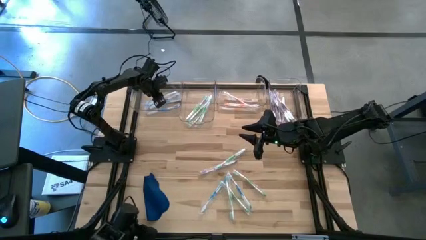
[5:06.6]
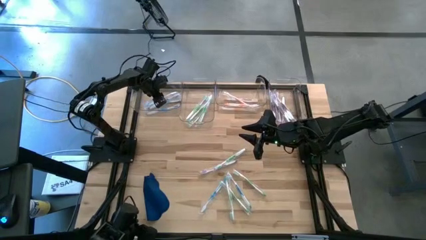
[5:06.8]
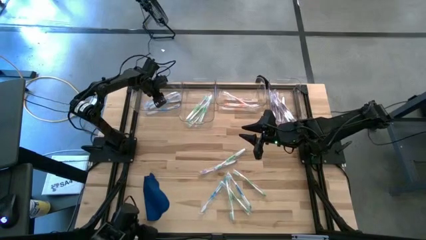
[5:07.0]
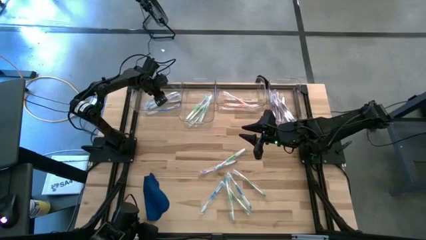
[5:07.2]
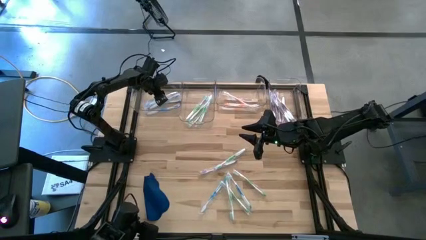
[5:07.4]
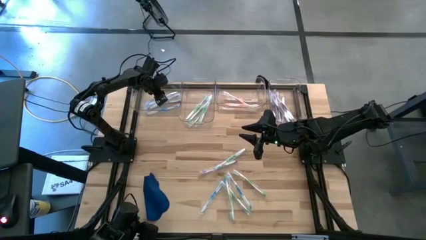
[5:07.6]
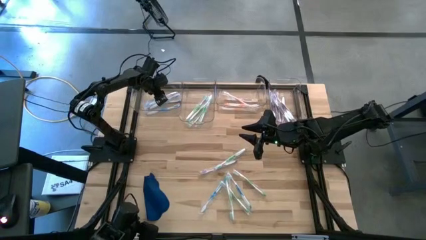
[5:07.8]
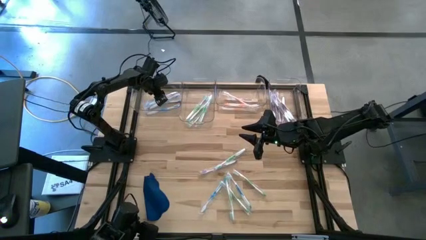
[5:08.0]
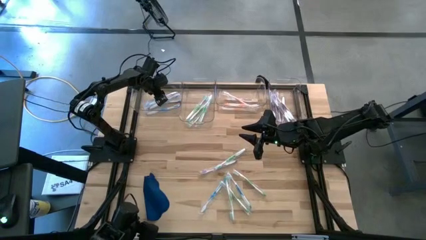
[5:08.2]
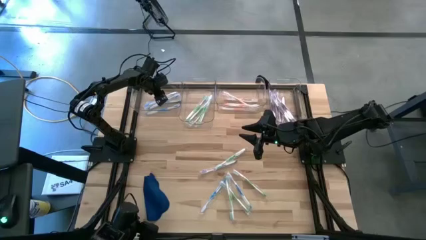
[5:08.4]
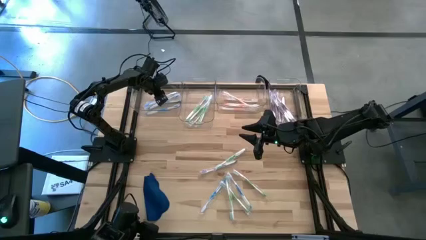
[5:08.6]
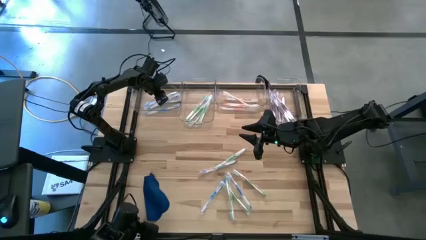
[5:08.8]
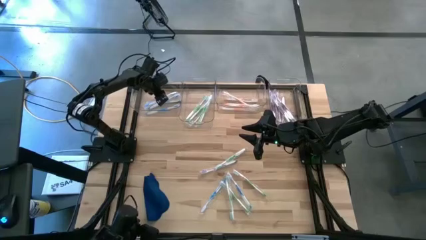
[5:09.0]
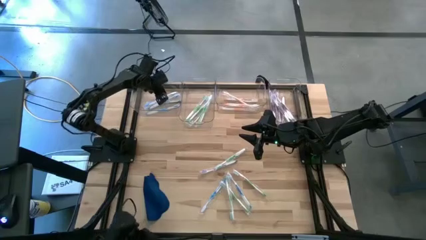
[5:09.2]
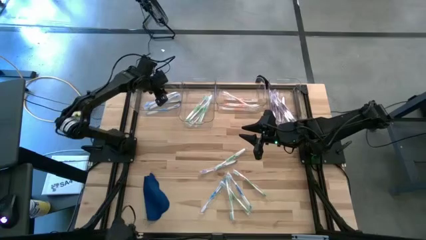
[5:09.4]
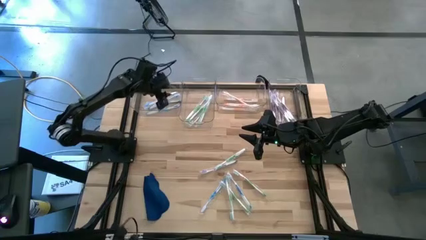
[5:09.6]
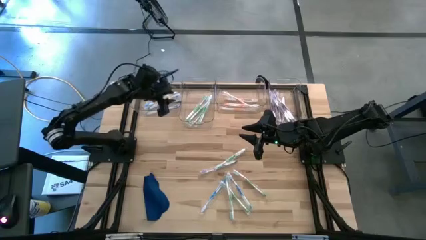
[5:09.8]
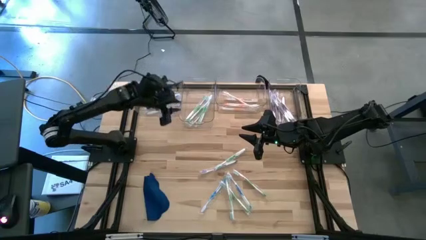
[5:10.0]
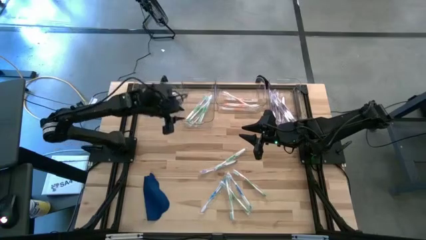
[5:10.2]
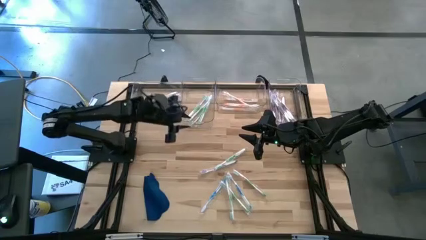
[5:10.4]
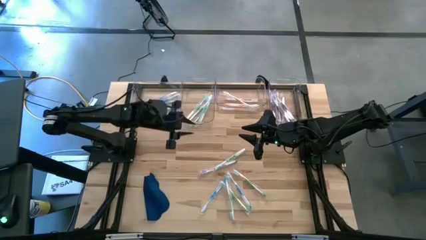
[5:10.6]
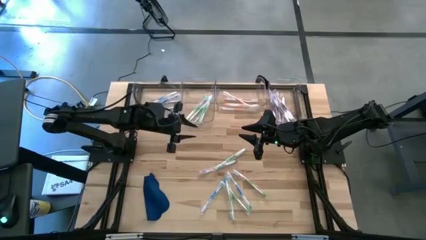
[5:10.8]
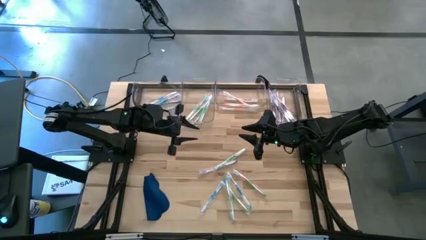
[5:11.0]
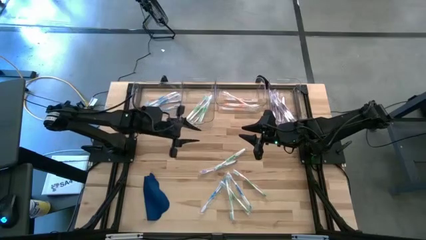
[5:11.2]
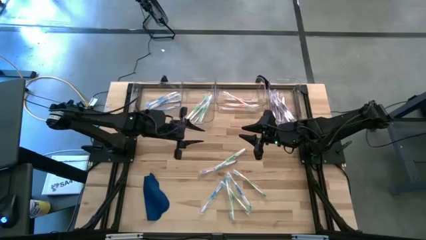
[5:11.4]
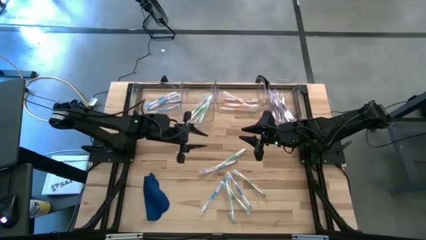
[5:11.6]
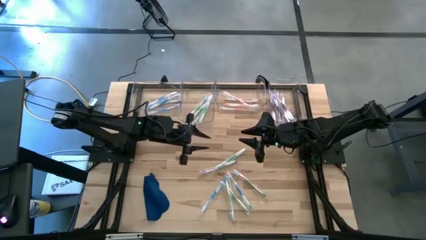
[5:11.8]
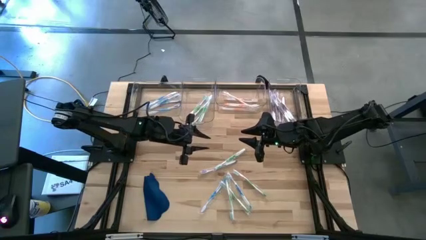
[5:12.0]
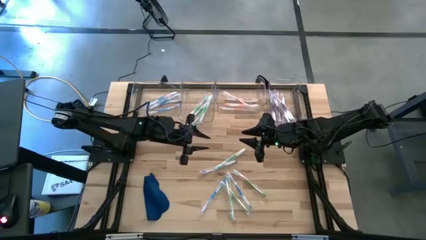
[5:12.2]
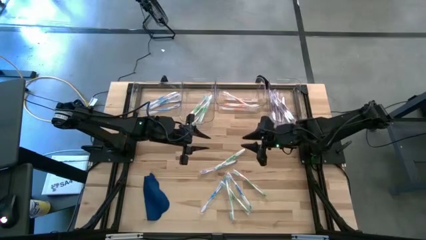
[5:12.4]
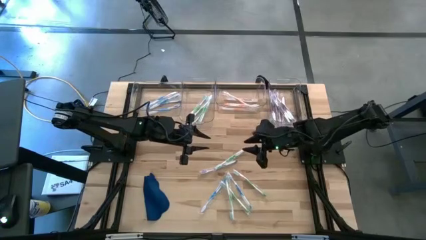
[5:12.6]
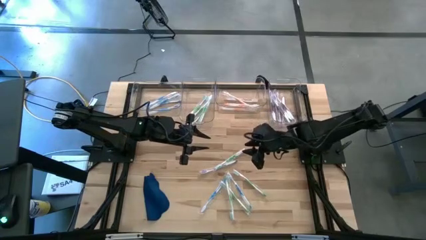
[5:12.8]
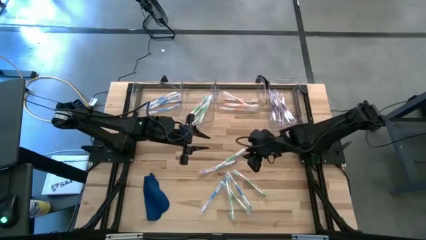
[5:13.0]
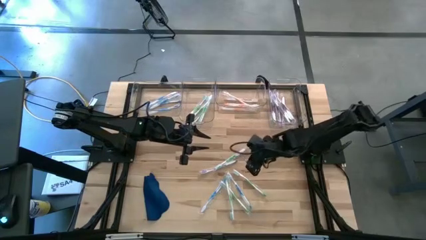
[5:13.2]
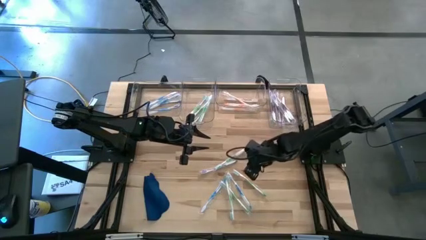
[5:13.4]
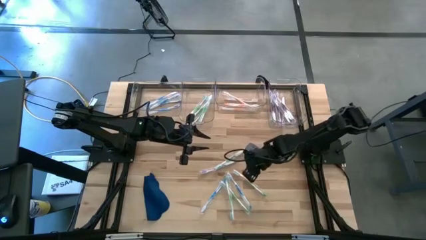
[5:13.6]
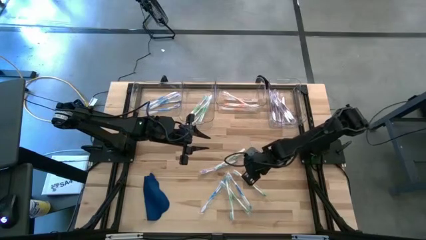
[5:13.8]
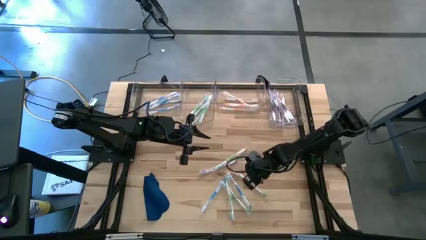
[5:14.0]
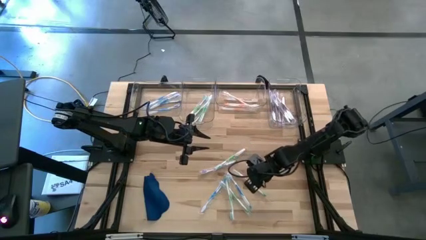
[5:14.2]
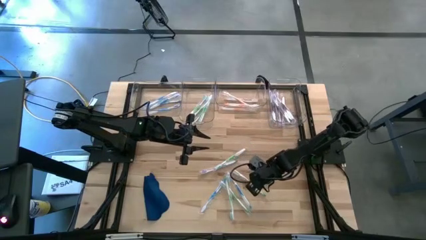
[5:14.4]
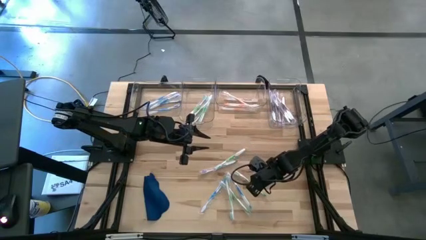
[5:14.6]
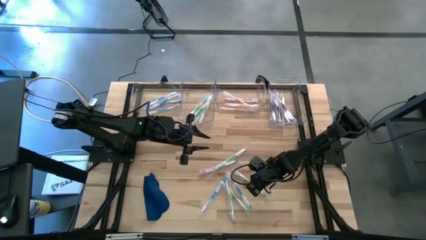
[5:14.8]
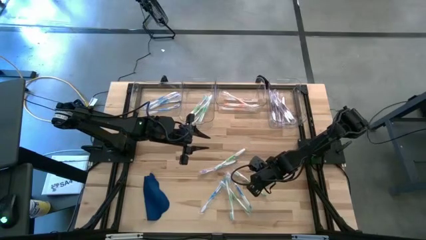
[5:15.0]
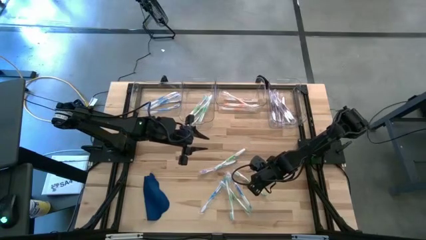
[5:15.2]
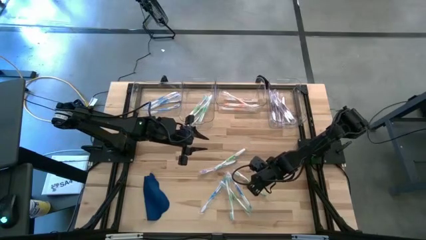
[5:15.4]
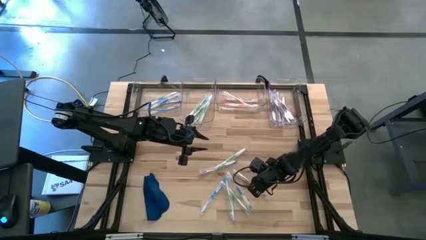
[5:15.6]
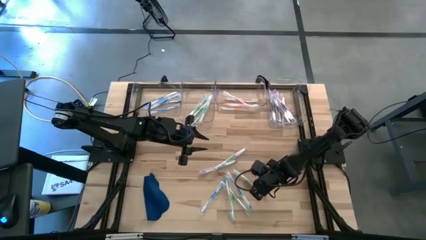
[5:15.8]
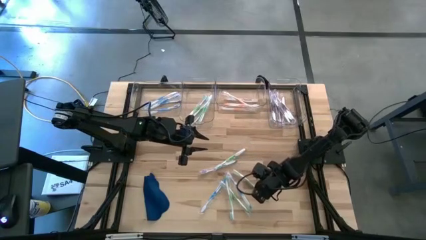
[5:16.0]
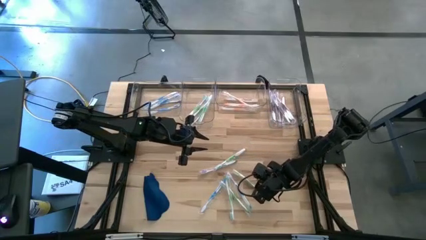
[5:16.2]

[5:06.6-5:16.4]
Task: Pick & Place Toothbrushes
Put the green toothbrush into the middle left transparent bin

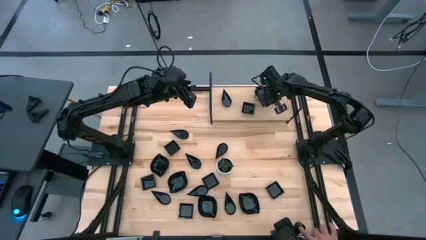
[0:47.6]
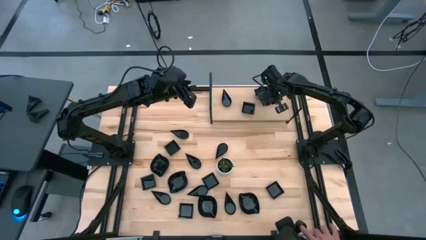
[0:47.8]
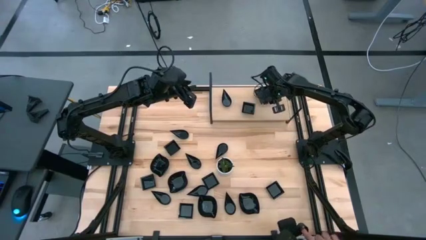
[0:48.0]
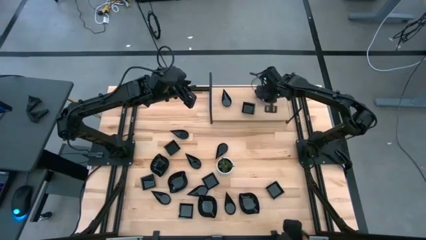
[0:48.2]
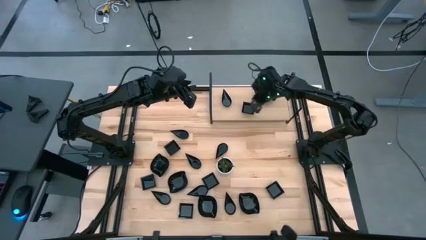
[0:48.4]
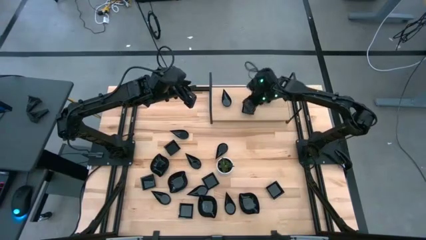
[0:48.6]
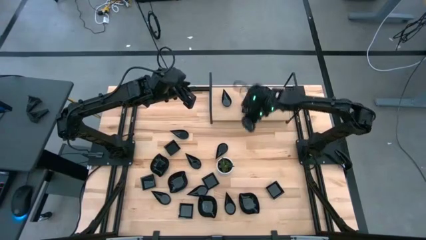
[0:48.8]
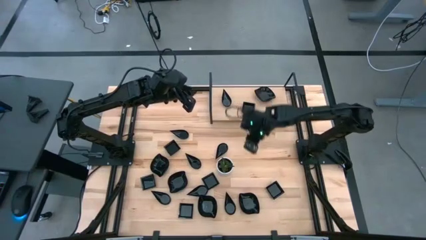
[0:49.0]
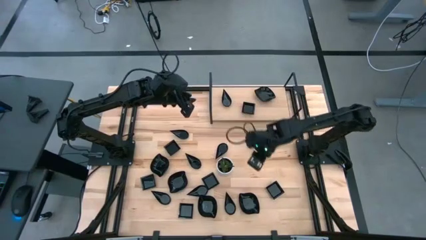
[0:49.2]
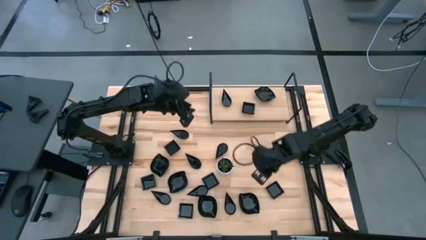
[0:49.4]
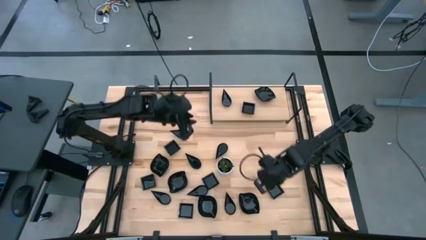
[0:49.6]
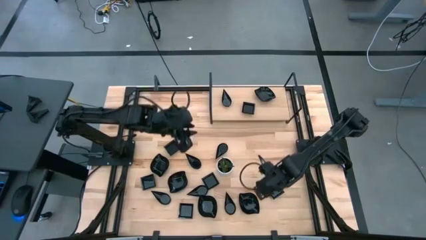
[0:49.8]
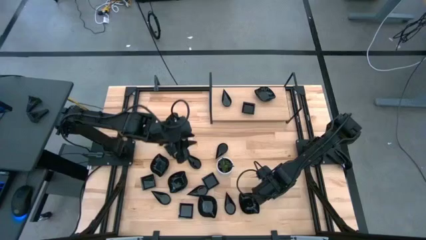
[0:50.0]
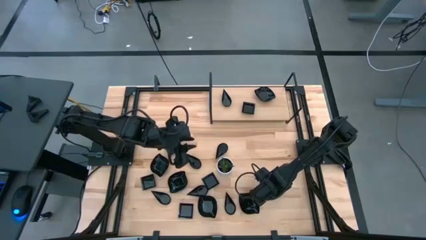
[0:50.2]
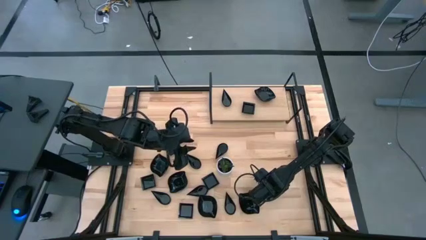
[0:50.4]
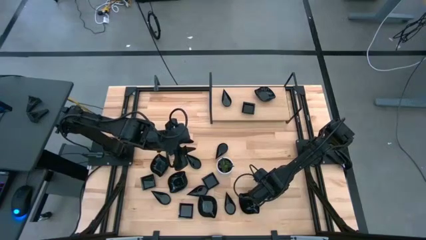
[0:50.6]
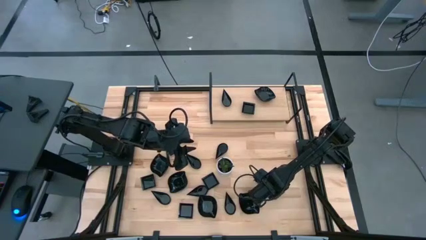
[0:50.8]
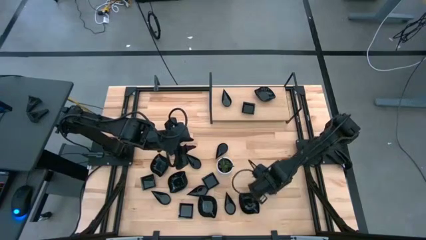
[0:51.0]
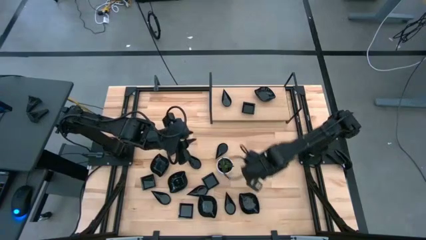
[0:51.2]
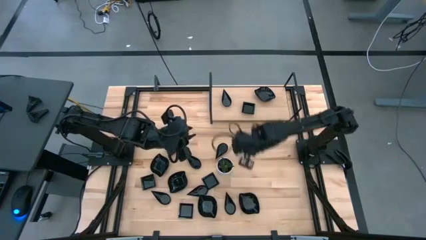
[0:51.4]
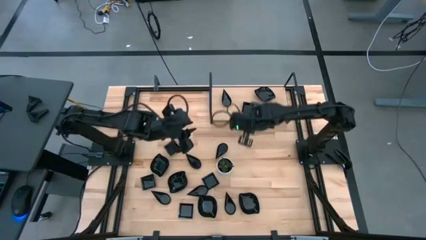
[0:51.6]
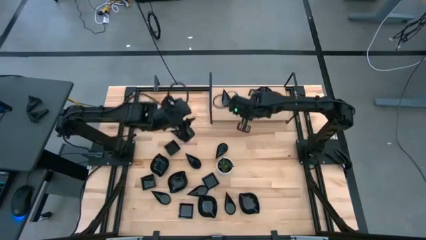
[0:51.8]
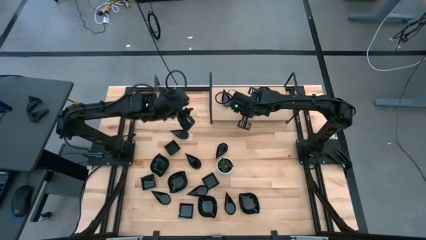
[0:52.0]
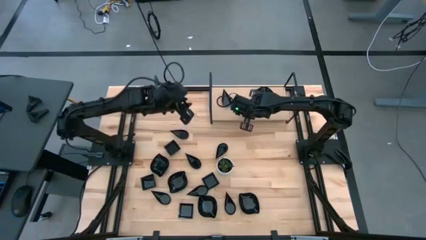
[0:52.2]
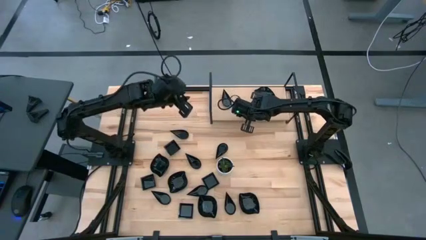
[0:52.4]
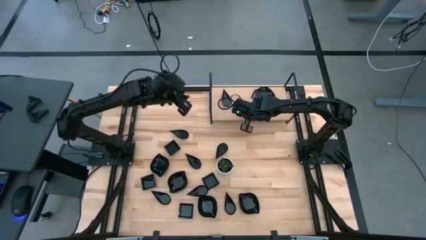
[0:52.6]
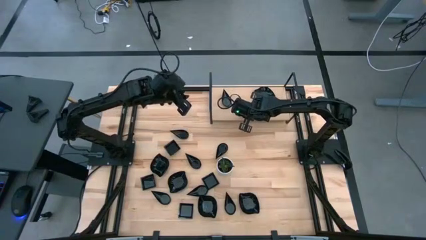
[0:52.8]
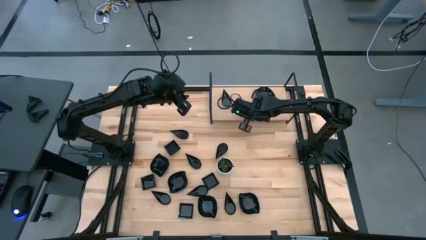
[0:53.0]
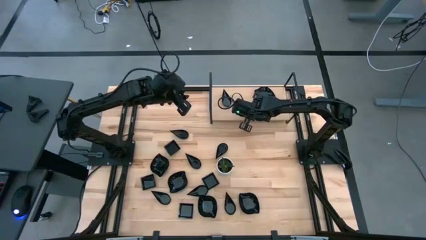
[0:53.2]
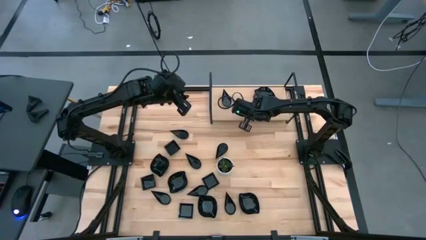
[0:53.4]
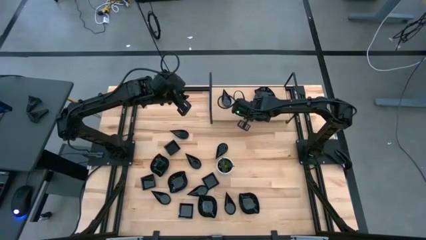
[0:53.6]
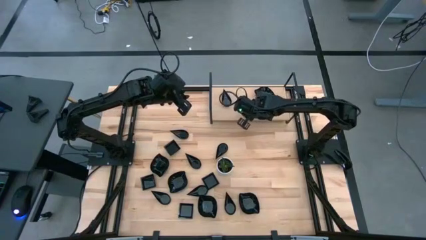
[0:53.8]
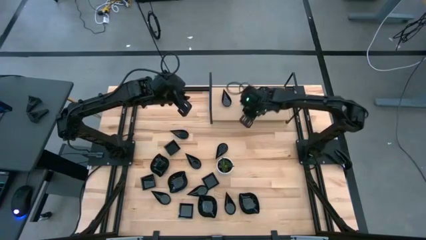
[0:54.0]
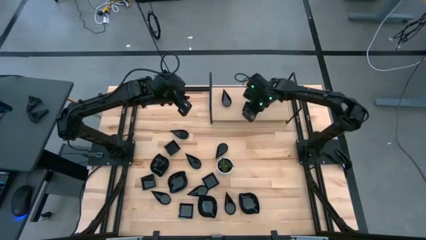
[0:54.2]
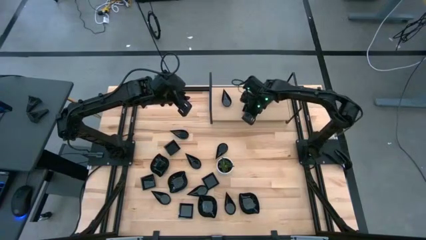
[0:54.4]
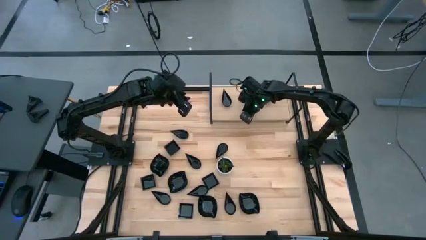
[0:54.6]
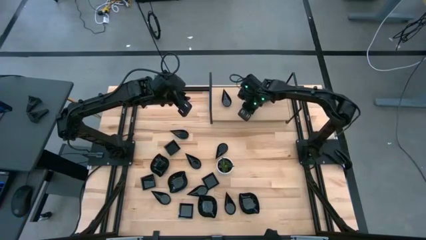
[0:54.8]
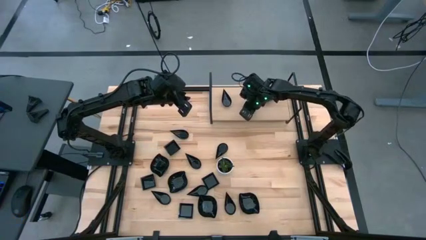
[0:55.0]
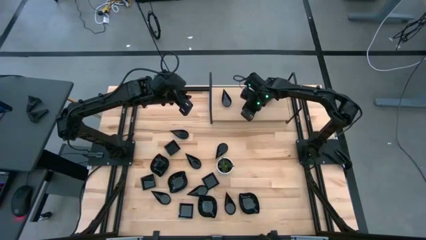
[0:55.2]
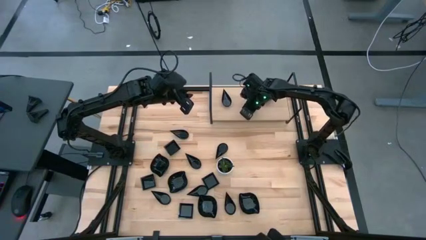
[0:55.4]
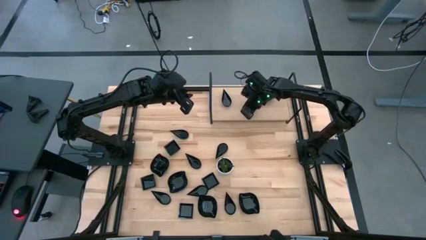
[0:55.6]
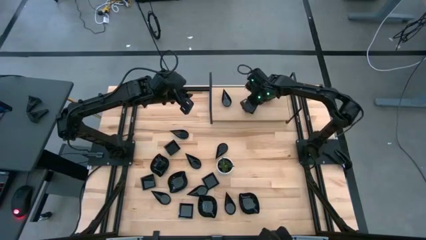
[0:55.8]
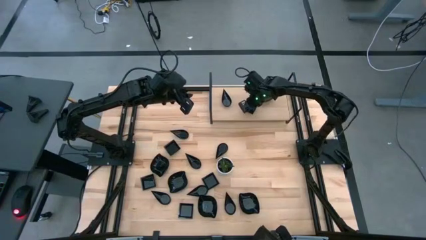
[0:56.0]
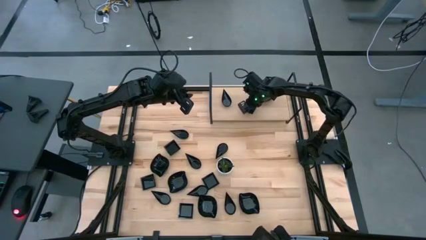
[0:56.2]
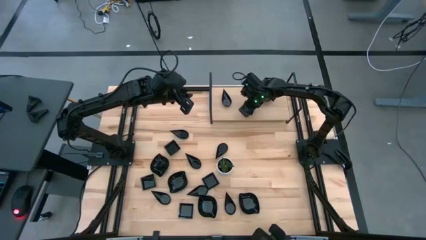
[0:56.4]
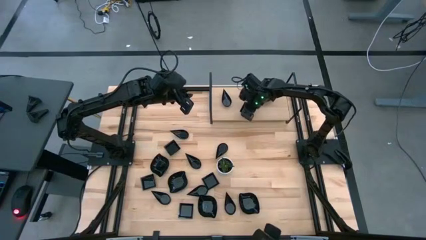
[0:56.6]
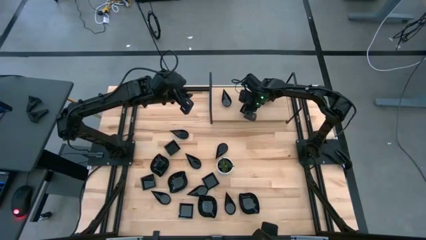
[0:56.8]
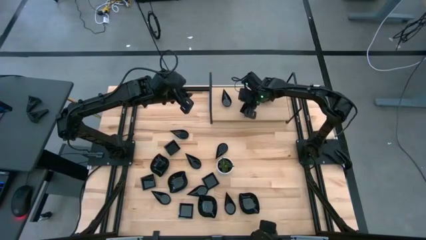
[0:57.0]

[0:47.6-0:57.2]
Task: Pick & Place Mini shaped plates
Stack the square plate on top of the square plate on the shelf
